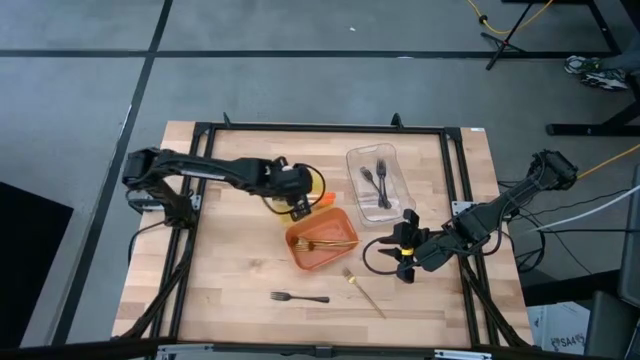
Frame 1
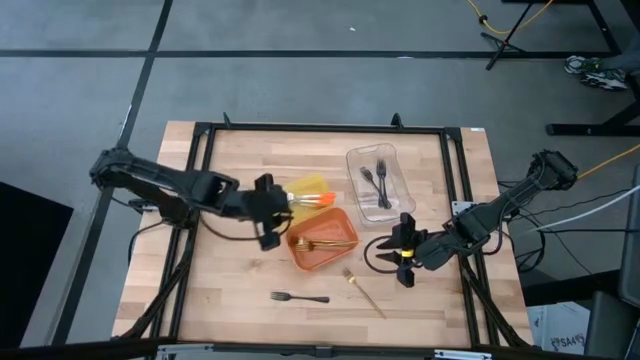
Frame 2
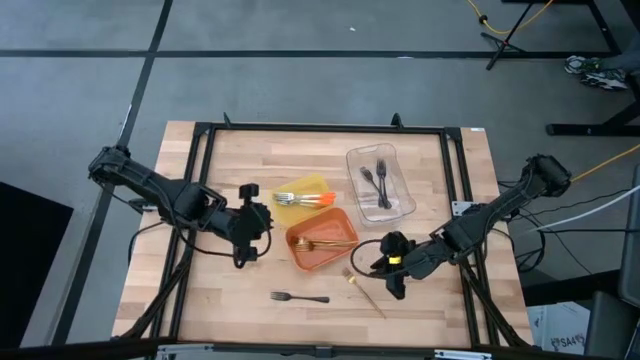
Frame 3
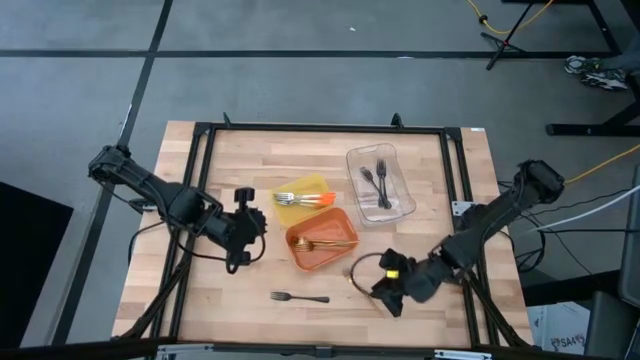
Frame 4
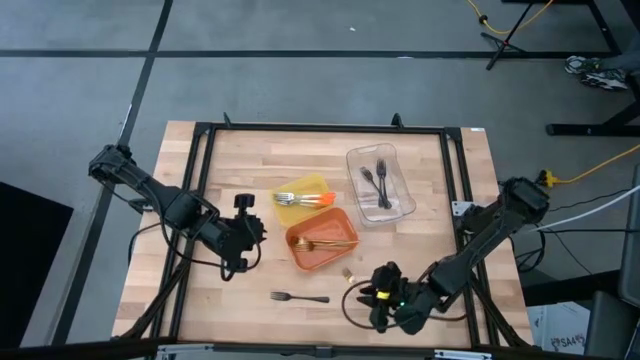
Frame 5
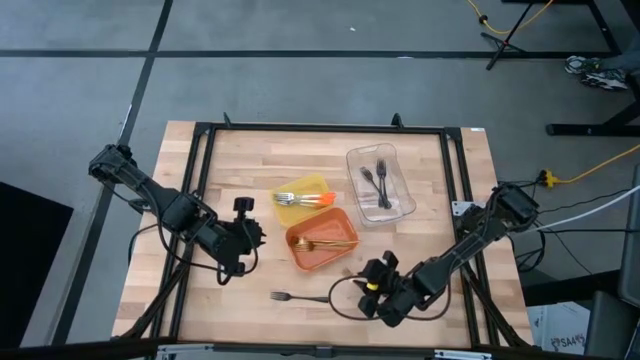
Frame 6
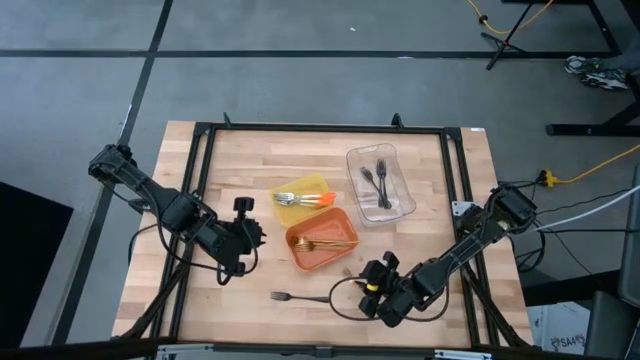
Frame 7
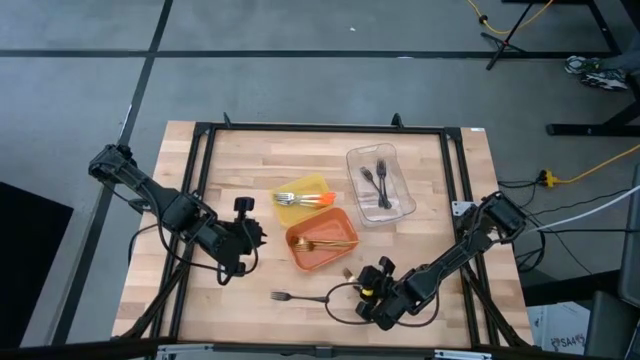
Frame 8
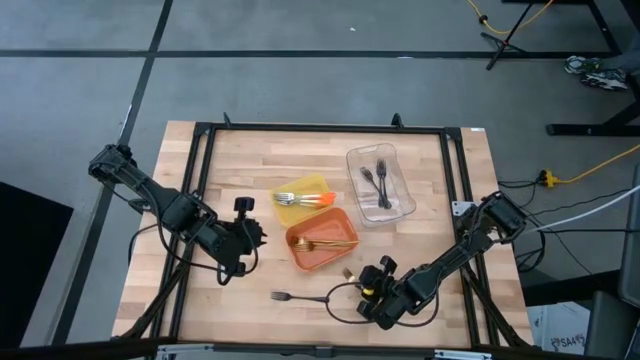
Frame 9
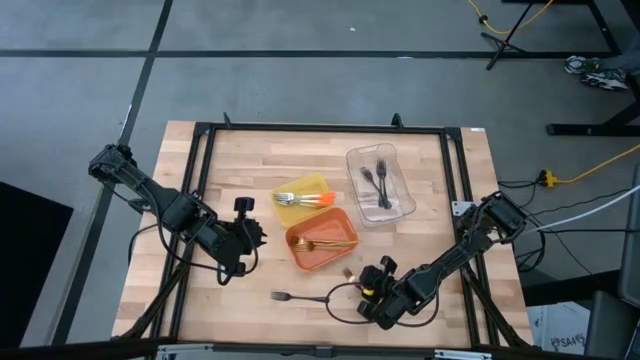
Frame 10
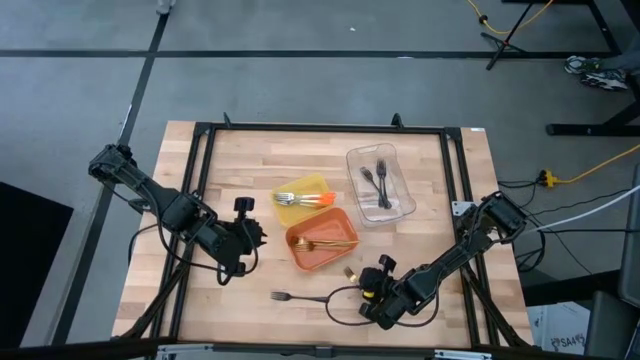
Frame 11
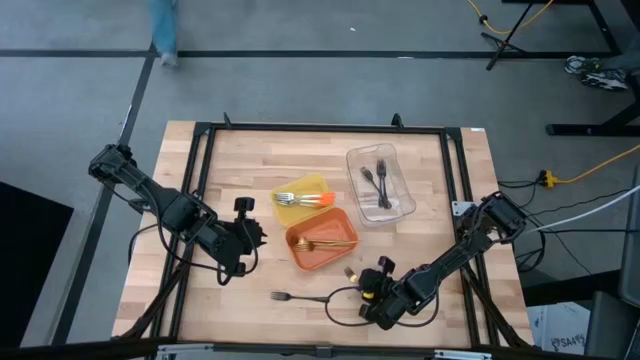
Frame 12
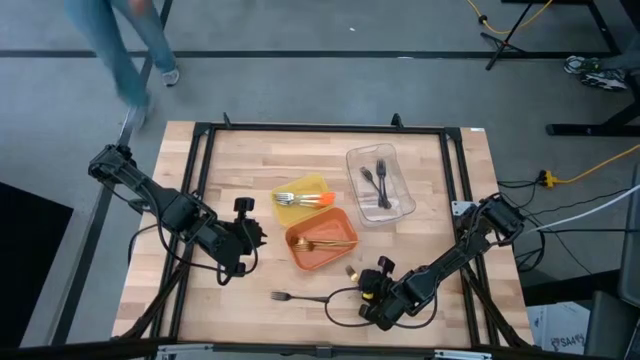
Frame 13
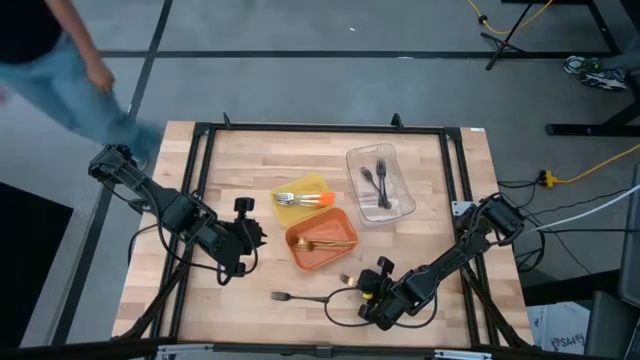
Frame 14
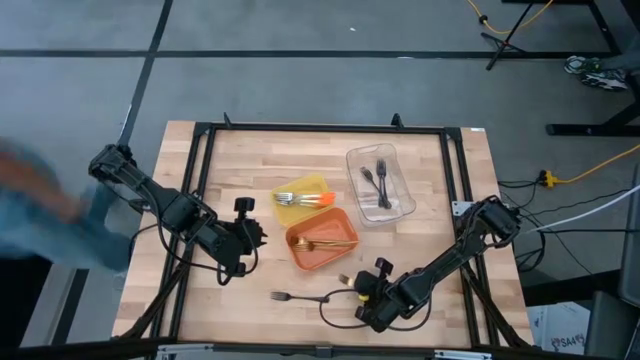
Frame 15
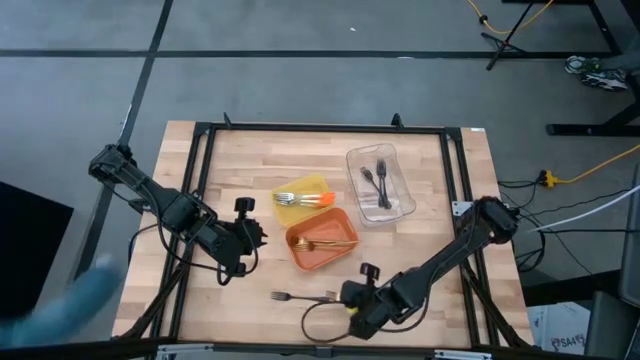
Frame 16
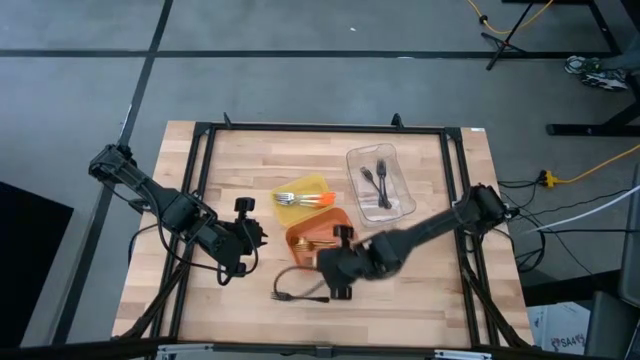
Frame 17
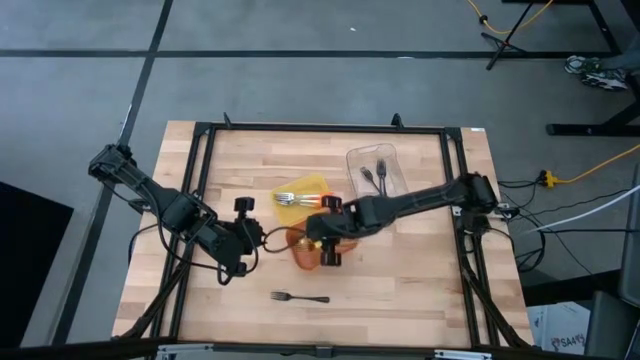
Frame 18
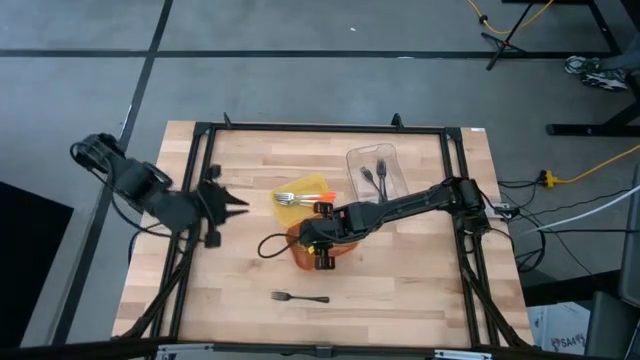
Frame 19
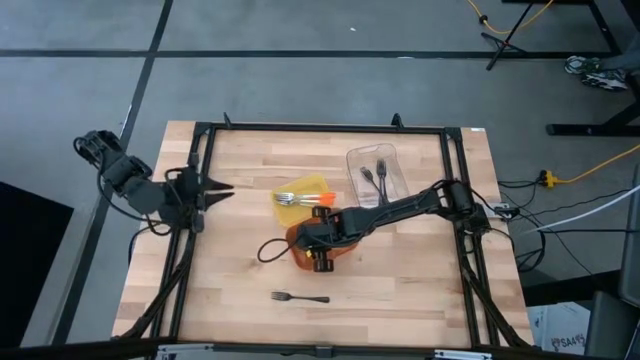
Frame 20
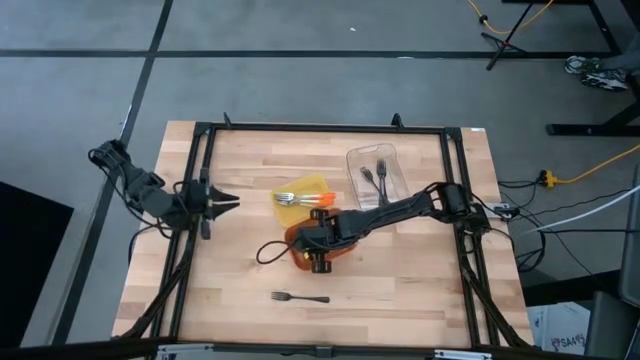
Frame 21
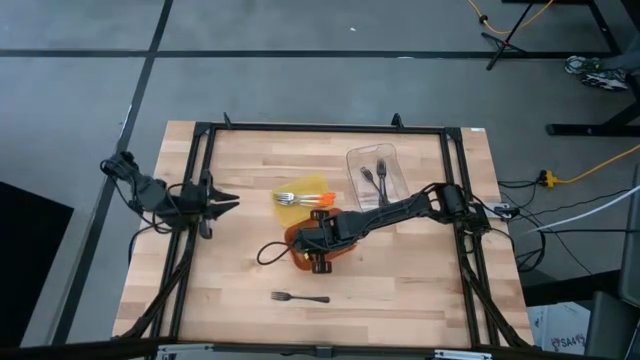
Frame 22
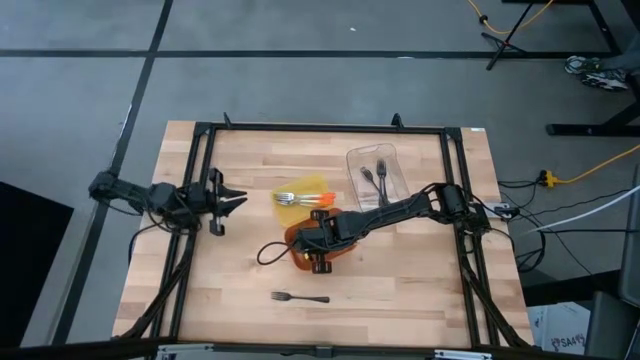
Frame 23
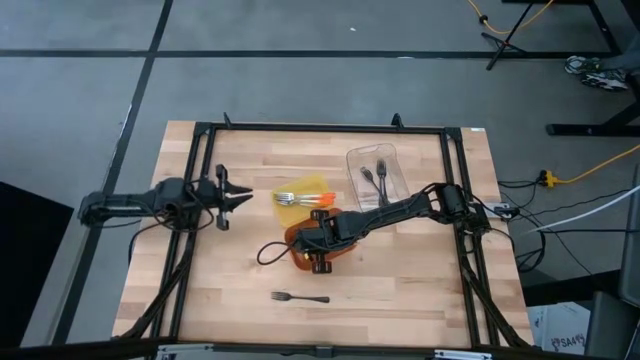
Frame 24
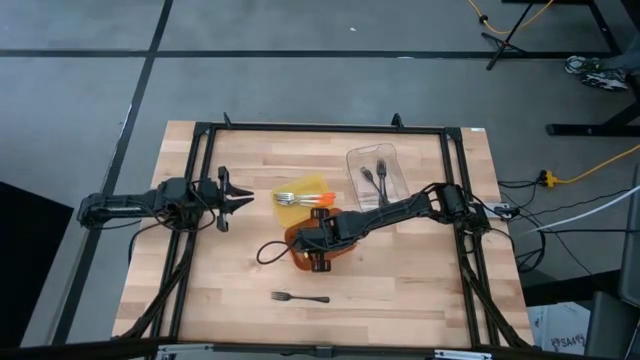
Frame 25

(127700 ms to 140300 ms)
Task: Sort silverware by color (type)
Put the gold fork into the orange bin

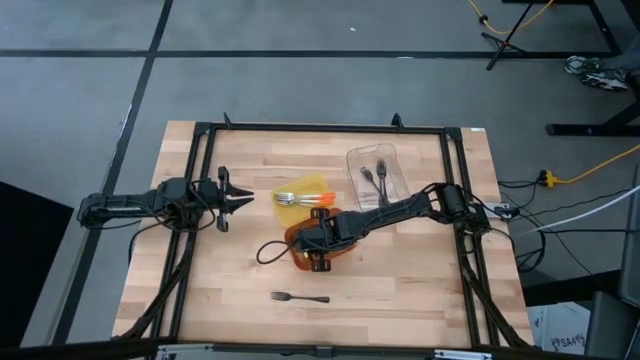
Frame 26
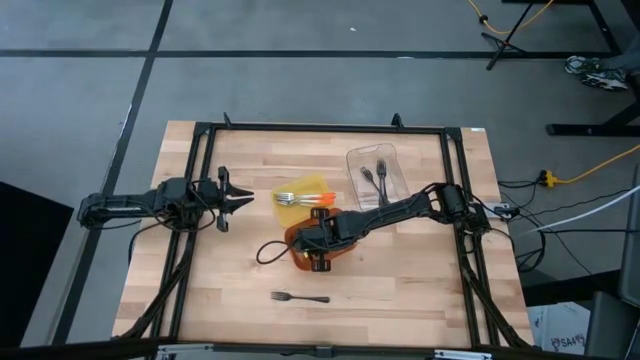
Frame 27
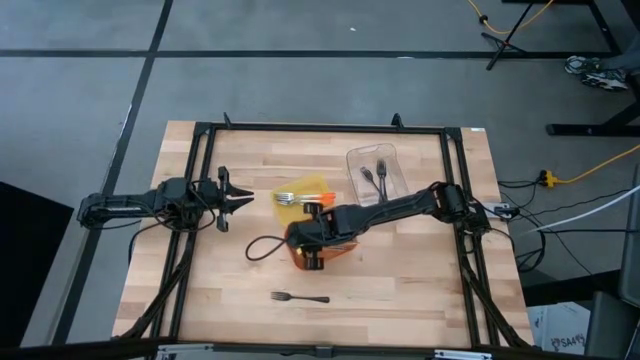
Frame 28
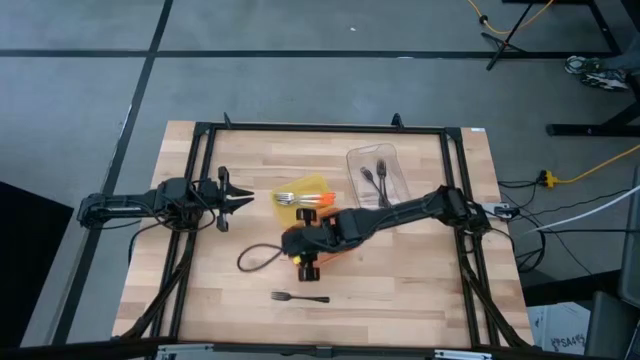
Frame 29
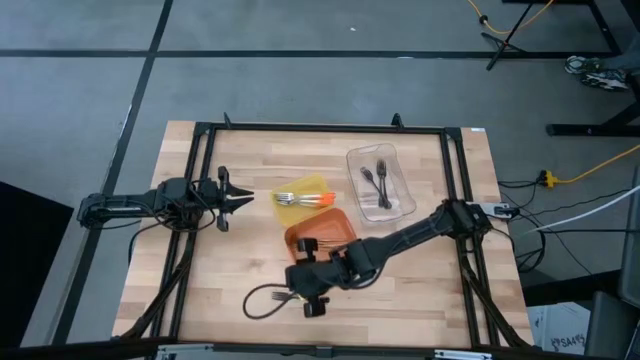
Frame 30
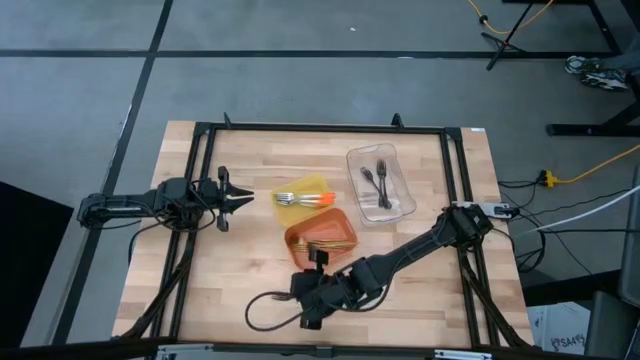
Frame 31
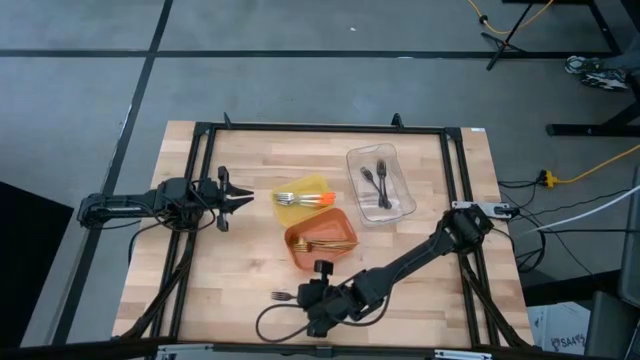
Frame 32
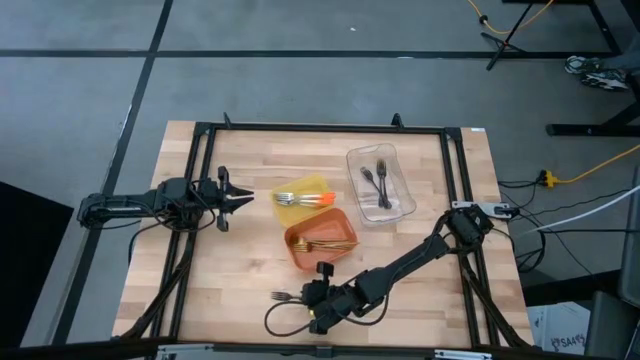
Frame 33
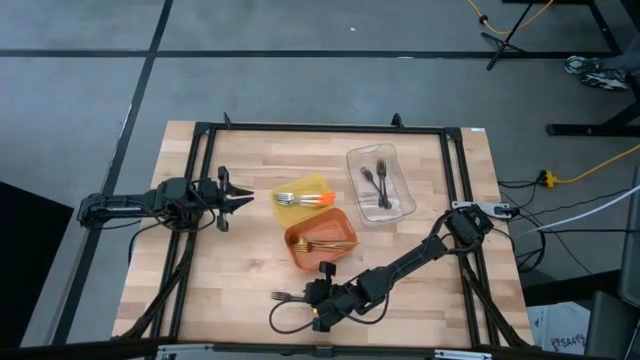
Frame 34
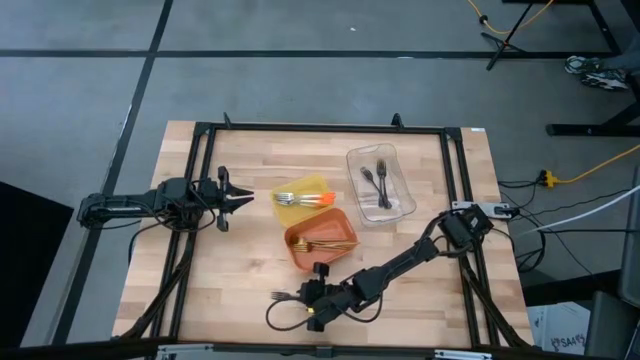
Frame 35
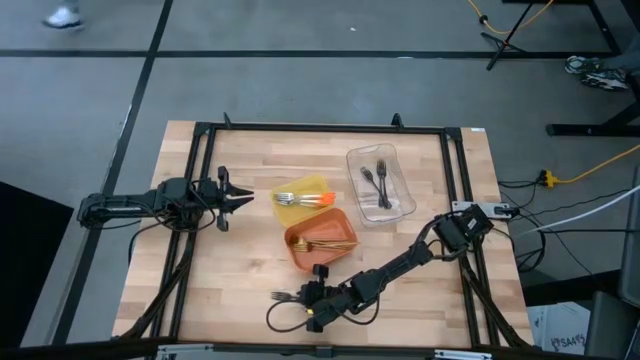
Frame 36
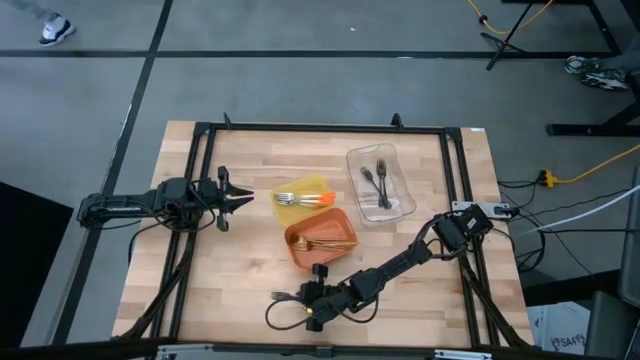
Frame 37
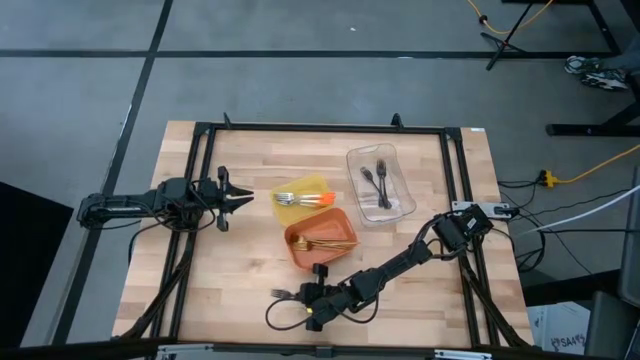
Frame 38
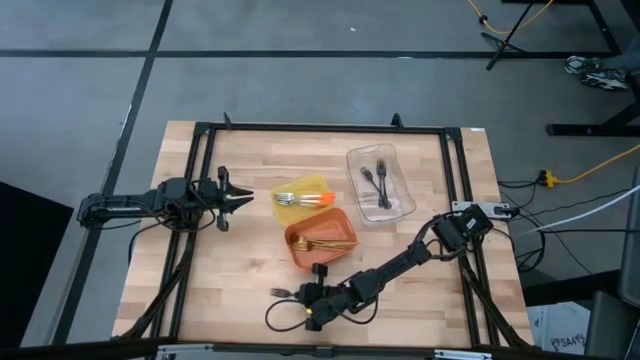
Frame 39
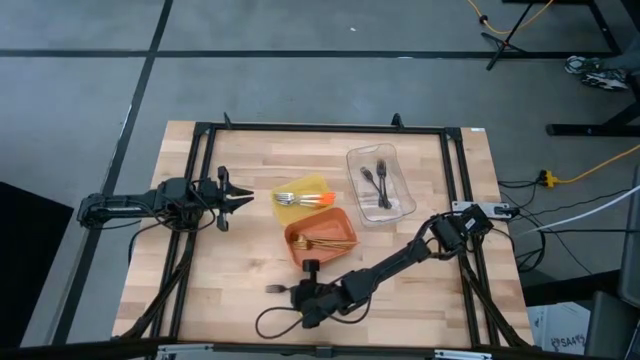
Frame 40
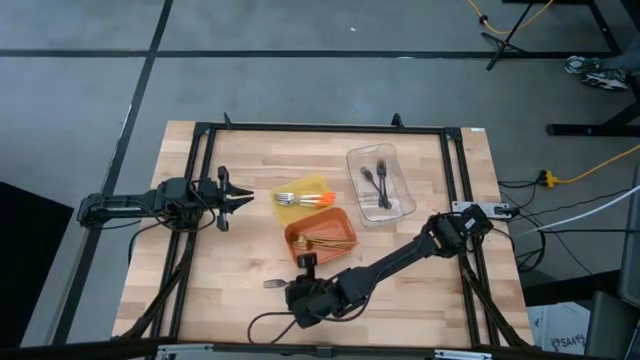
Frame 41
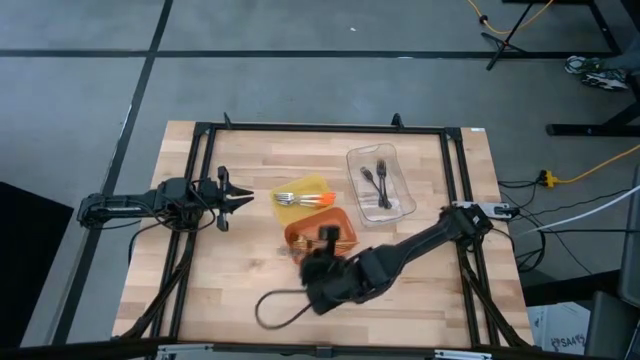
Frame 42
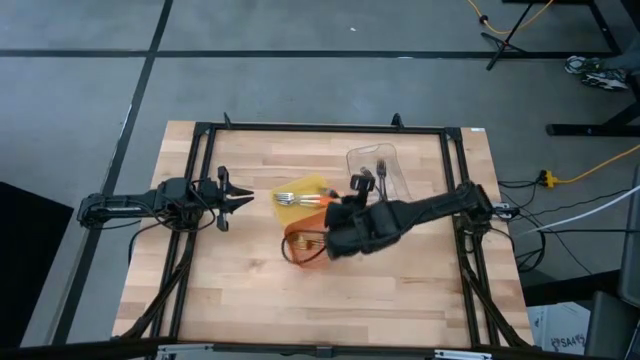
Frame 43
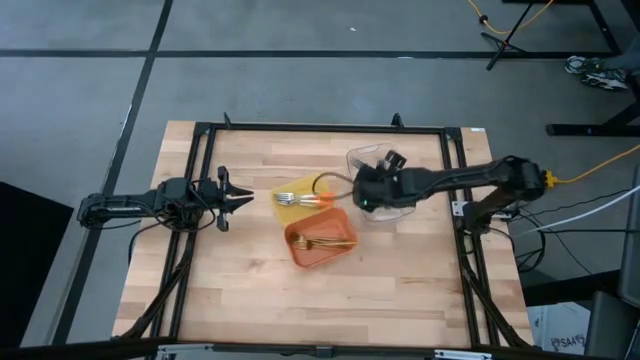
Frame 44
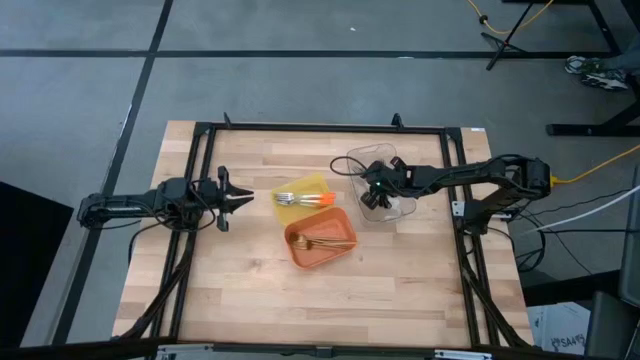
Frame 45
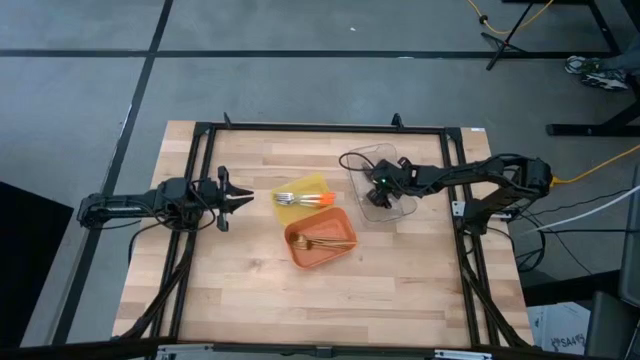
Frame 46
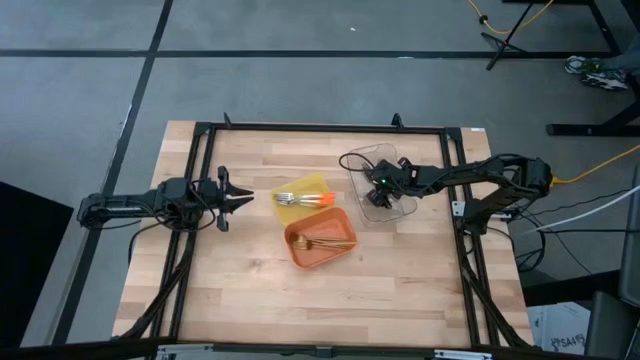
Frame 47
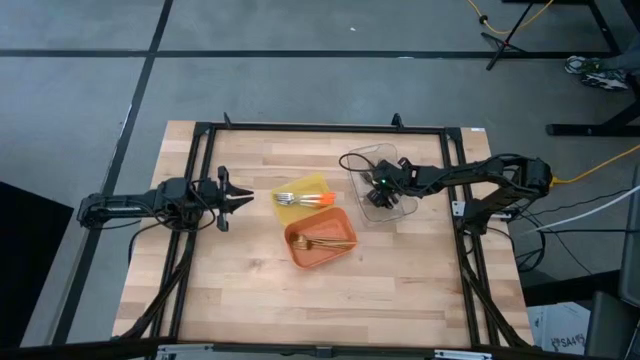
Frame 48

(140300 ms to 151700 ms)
Put the black fork into the transparent bin
